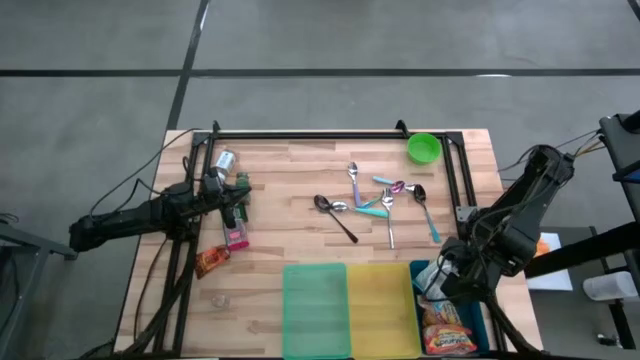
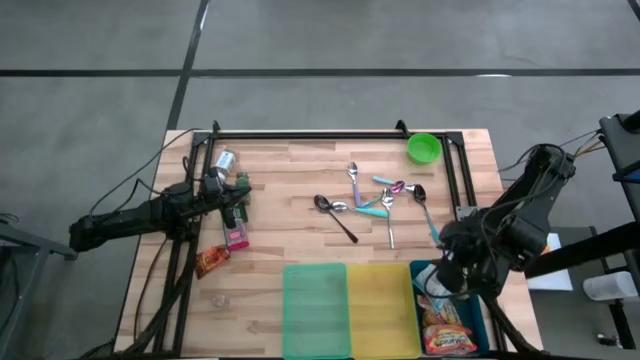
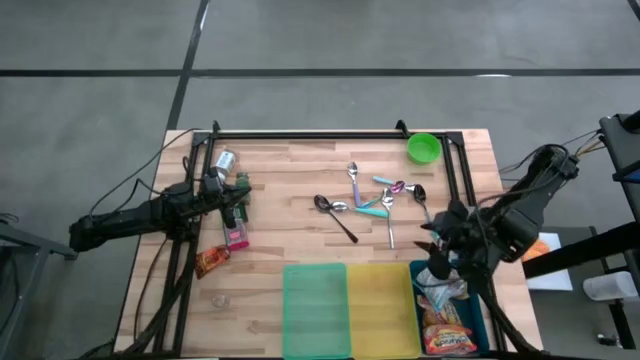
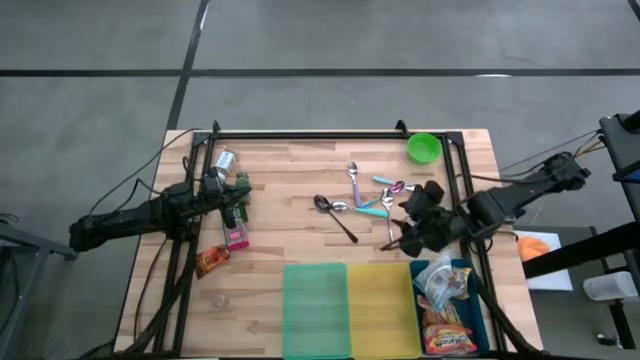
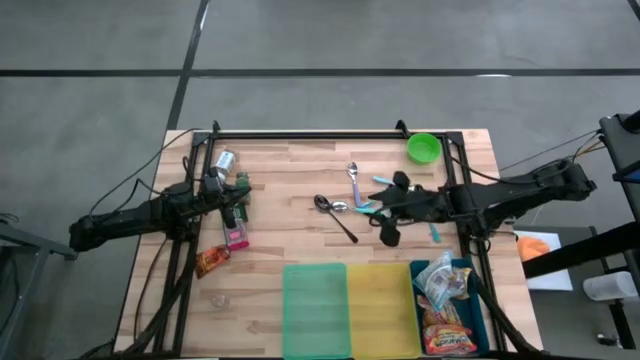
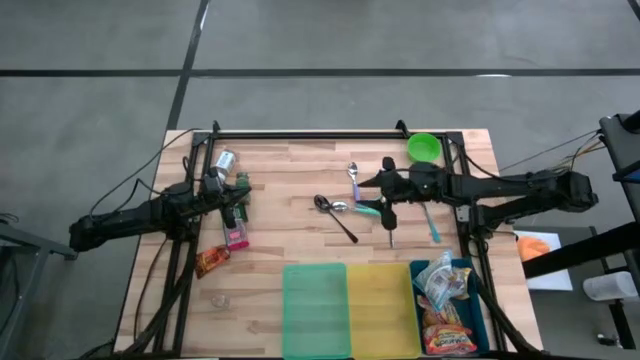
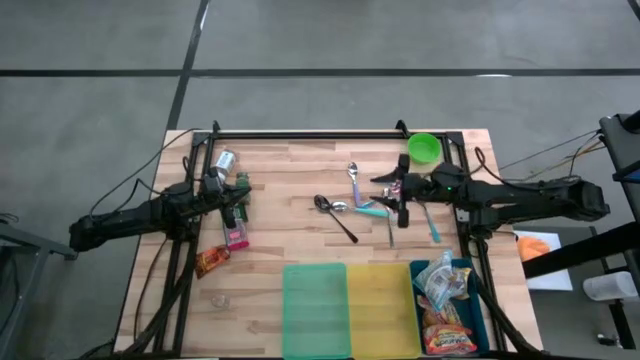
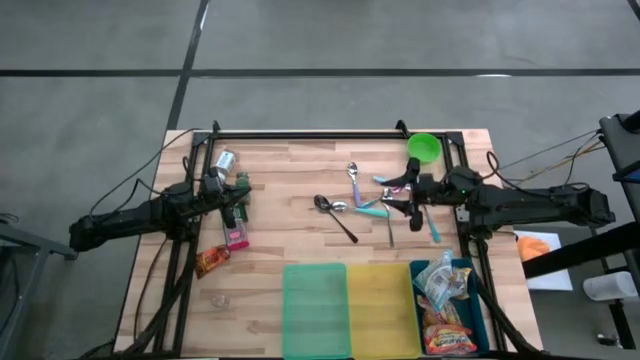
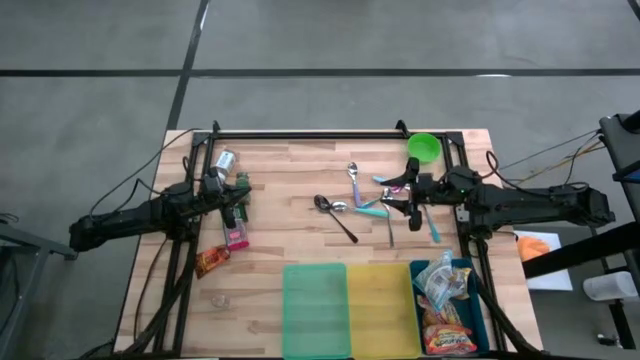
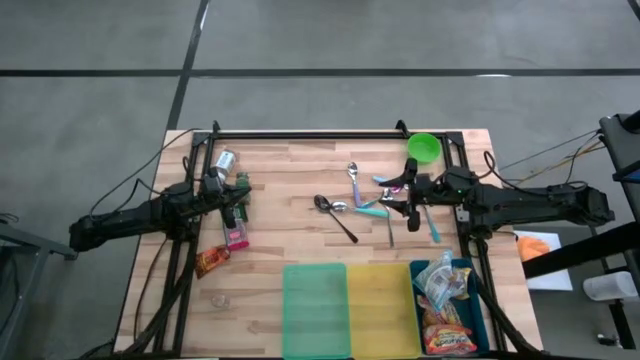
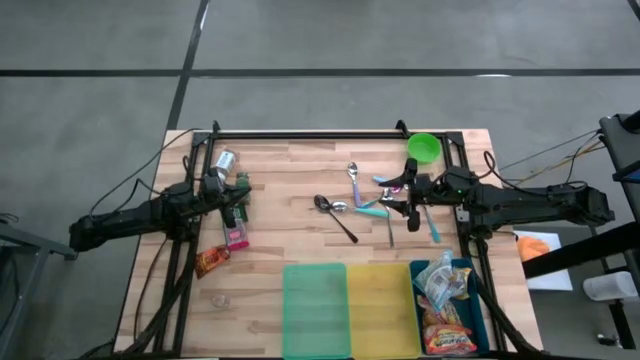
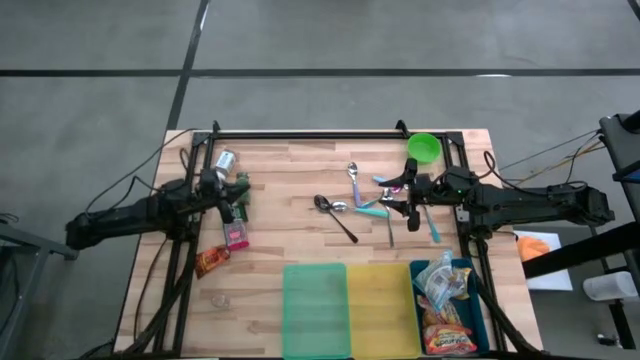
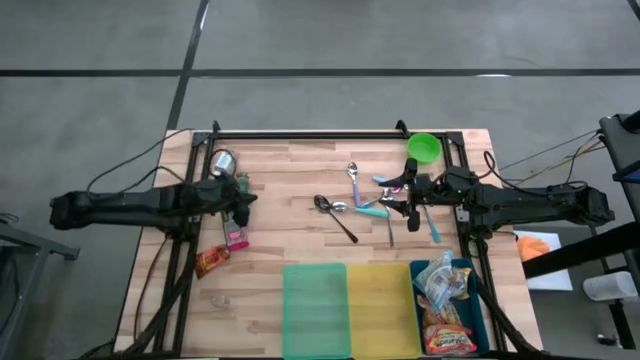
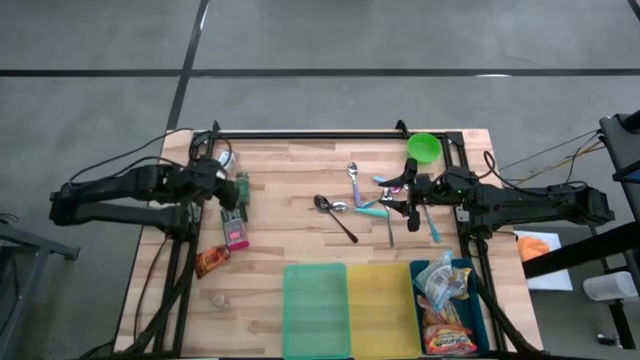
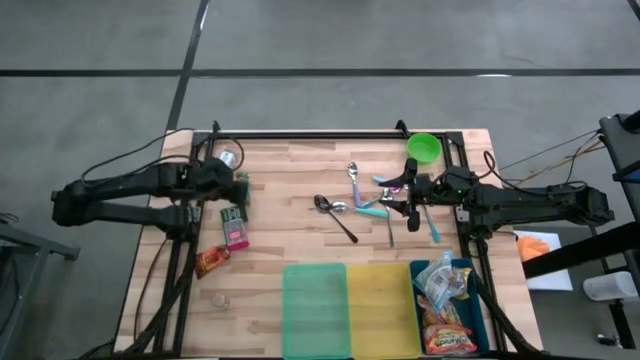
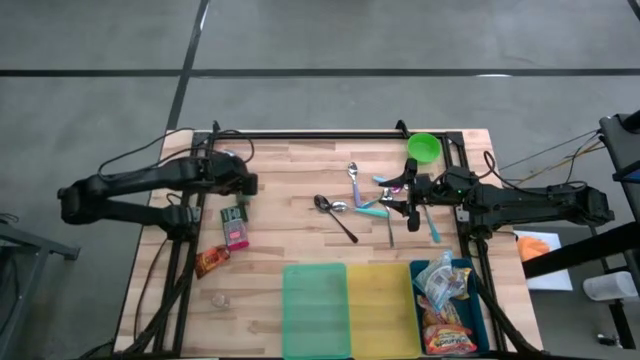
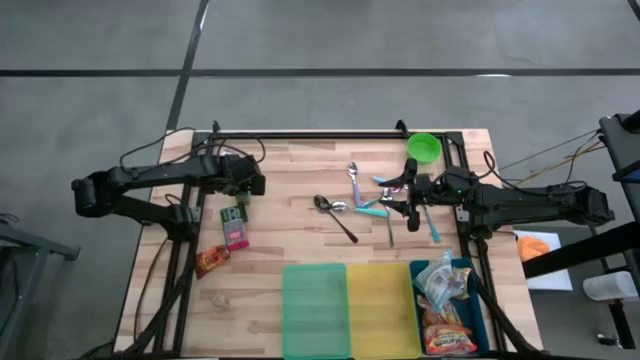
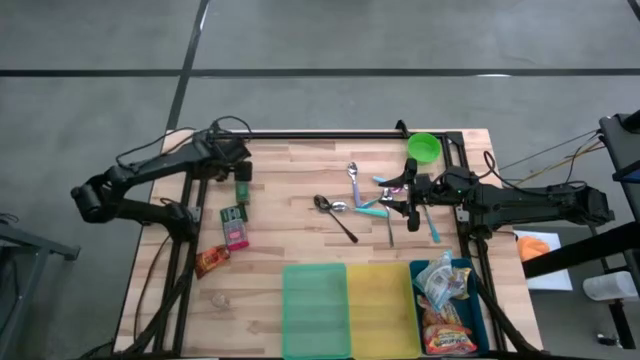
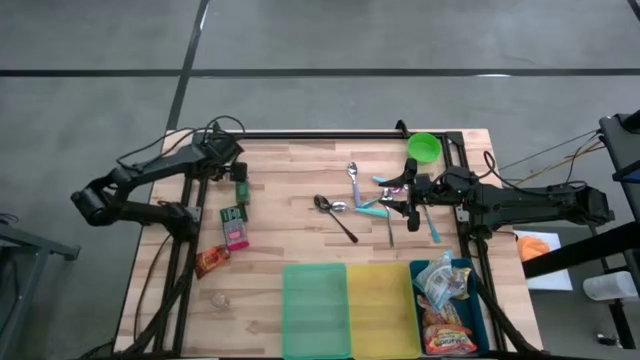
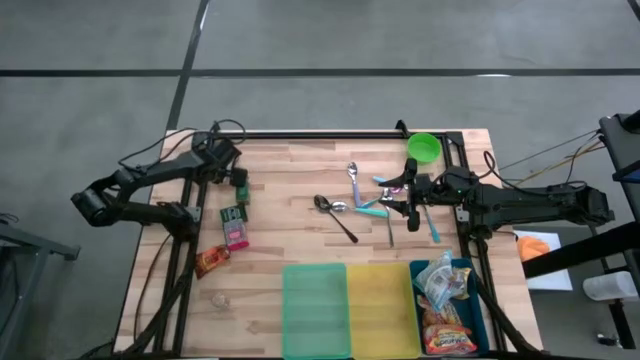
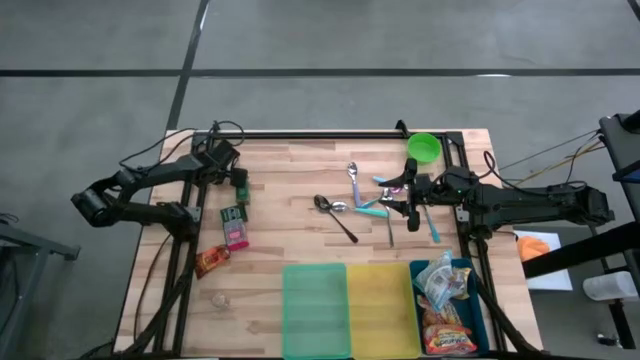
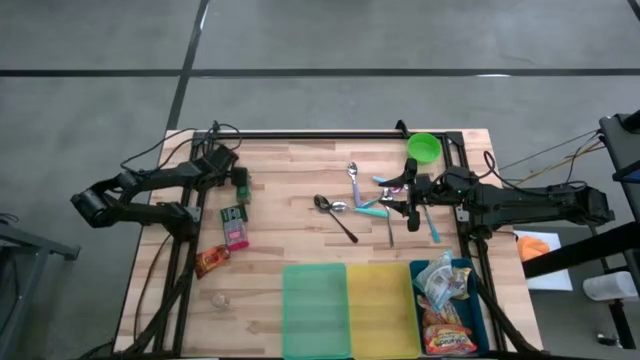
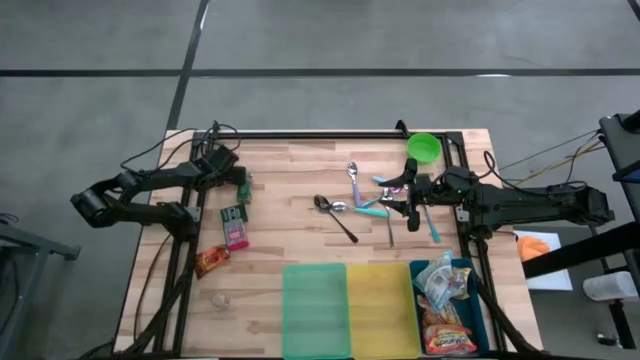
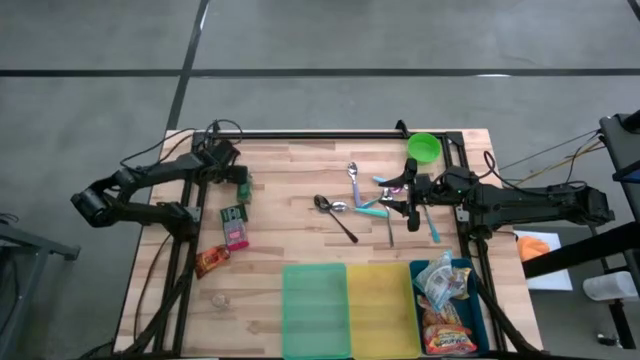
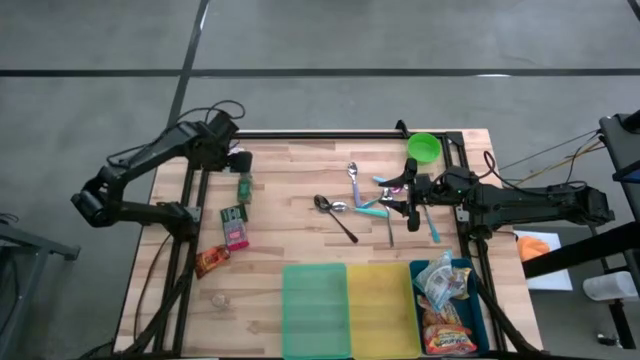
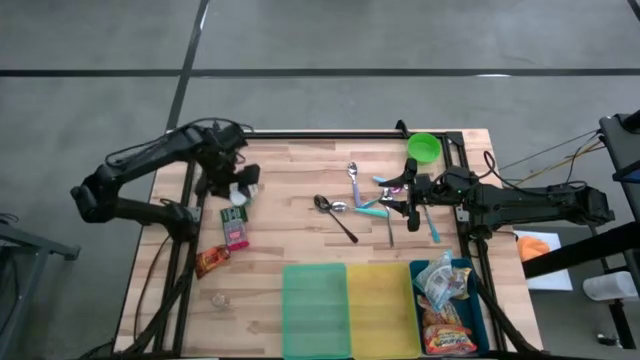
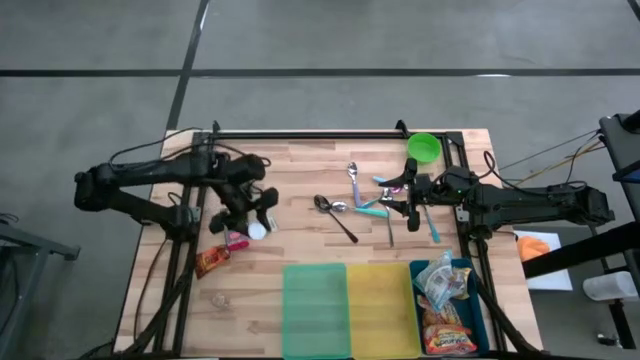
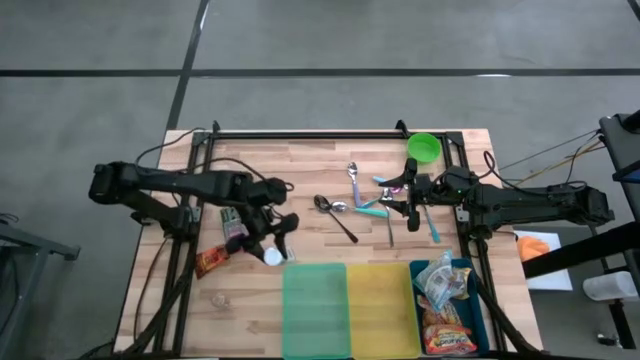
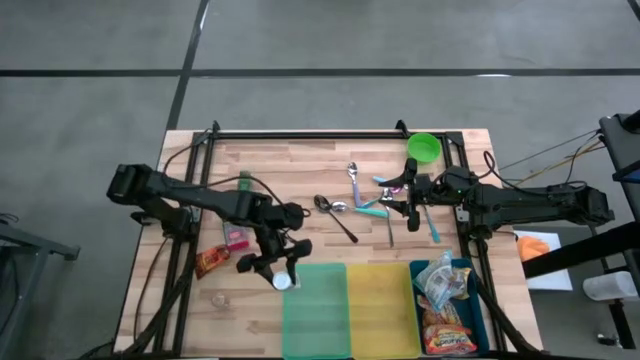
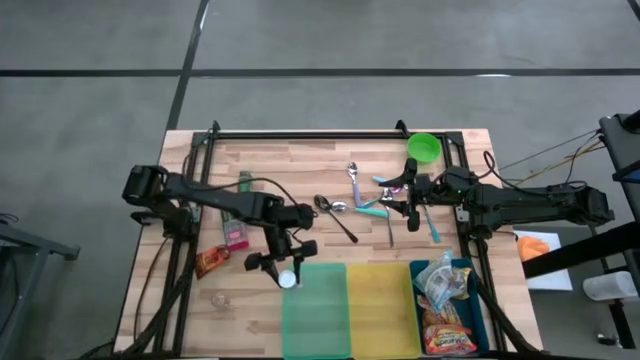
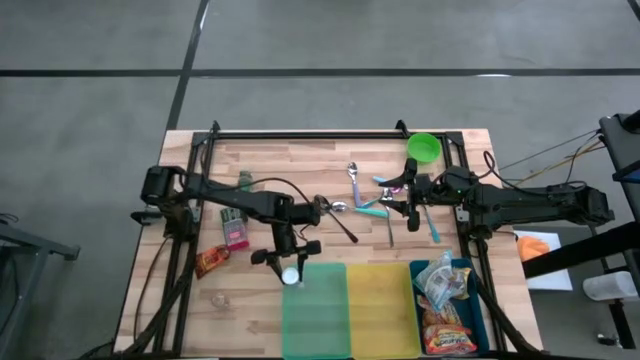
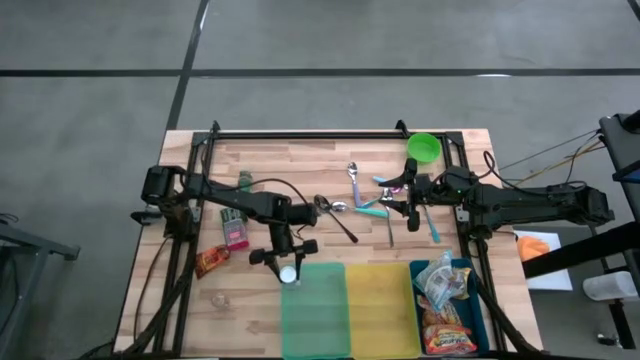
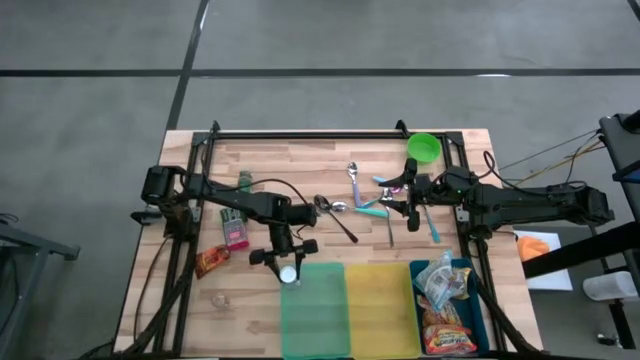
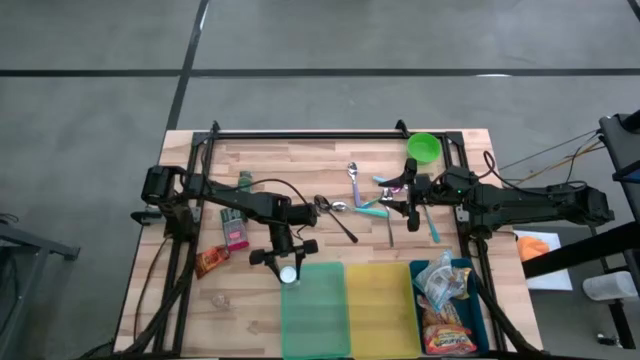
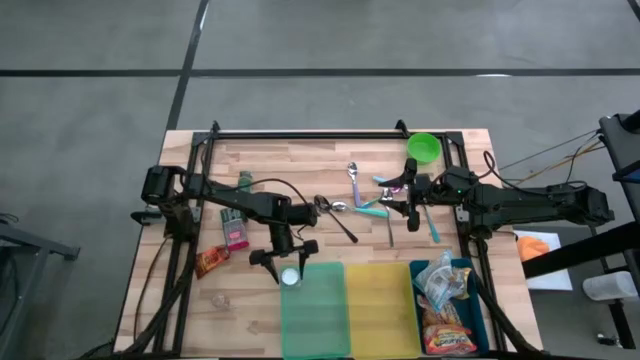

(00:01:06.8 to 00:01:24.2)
Put the white seasoning bottle into the green bin
